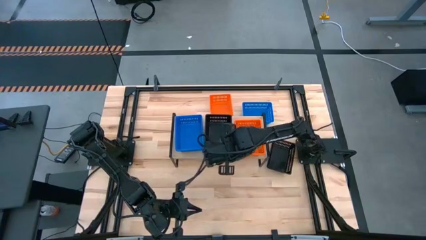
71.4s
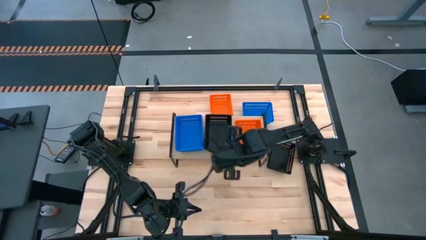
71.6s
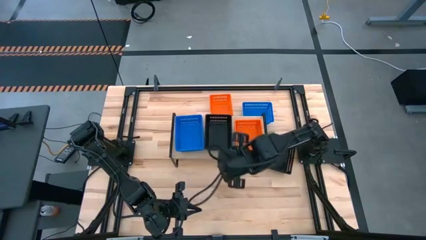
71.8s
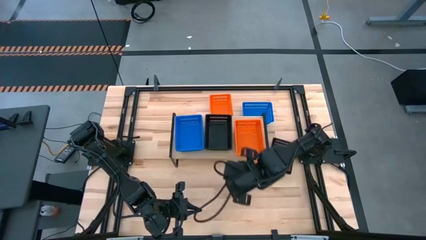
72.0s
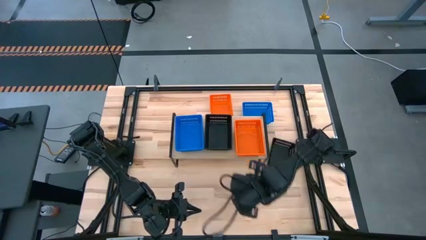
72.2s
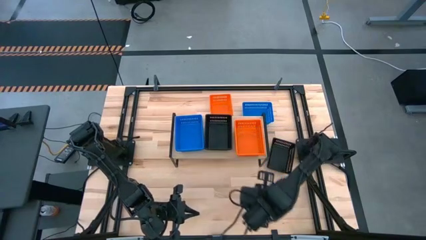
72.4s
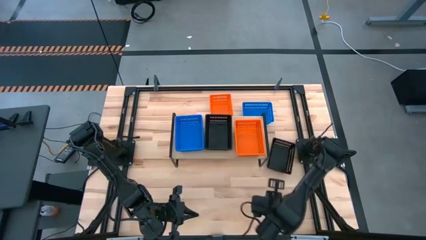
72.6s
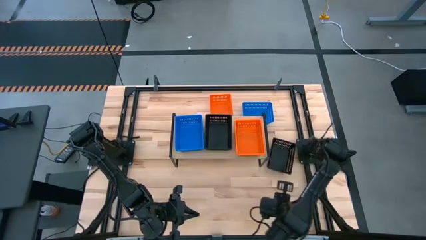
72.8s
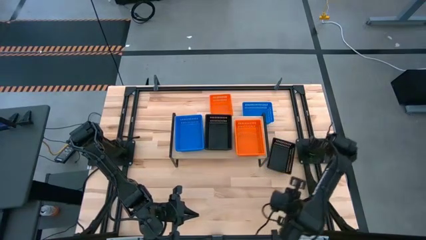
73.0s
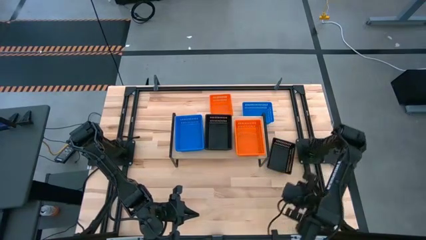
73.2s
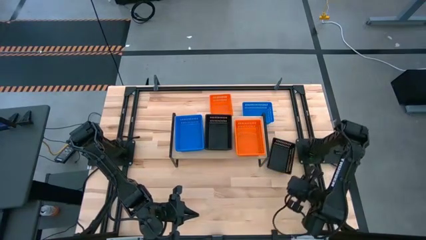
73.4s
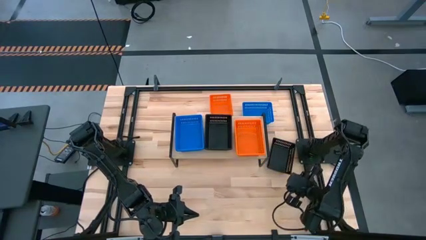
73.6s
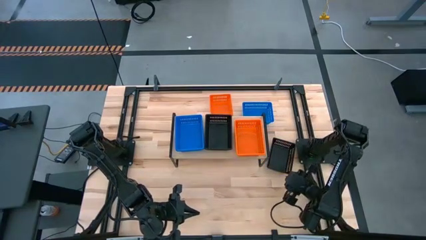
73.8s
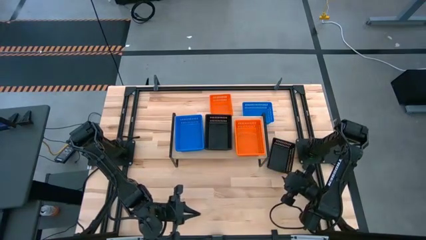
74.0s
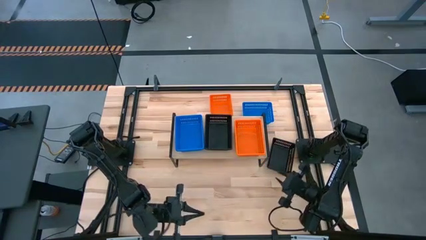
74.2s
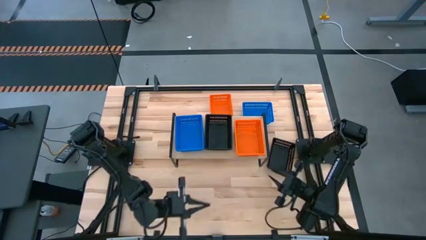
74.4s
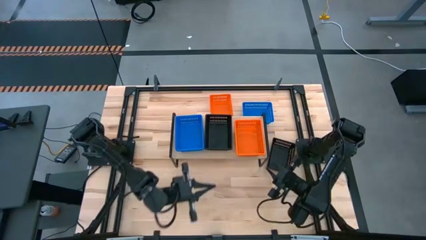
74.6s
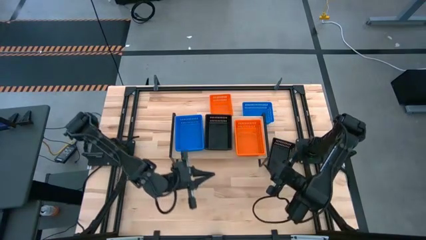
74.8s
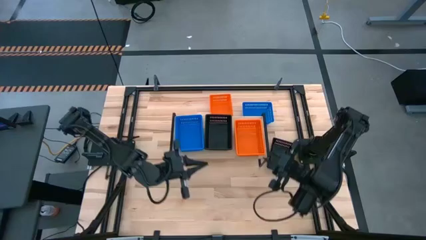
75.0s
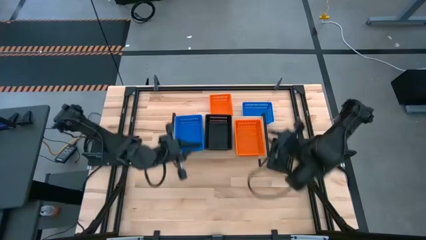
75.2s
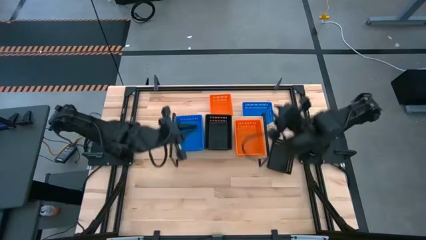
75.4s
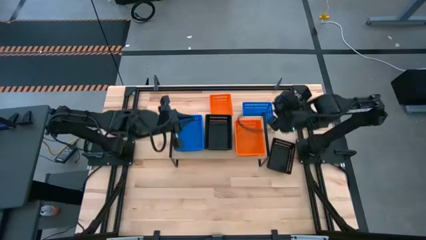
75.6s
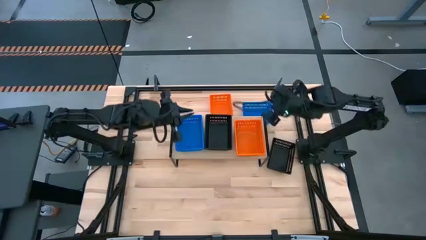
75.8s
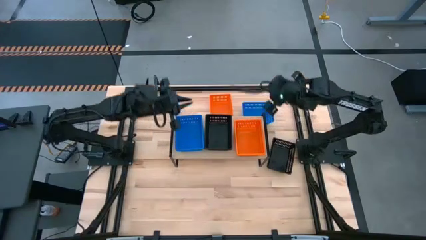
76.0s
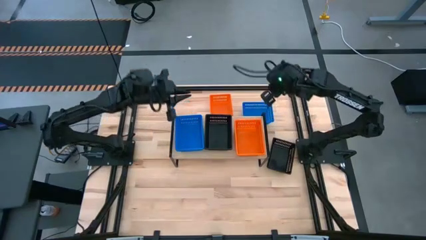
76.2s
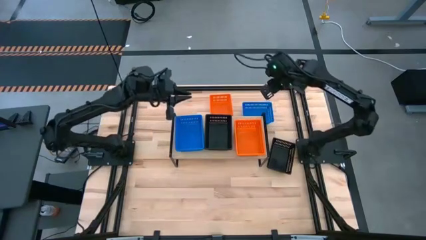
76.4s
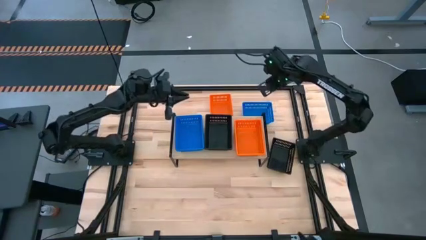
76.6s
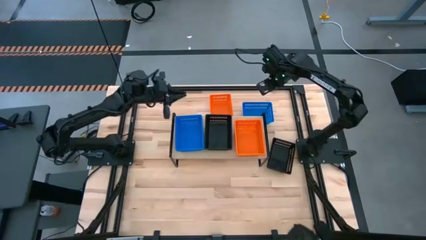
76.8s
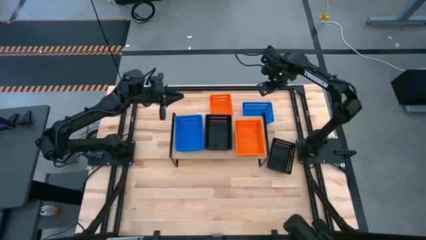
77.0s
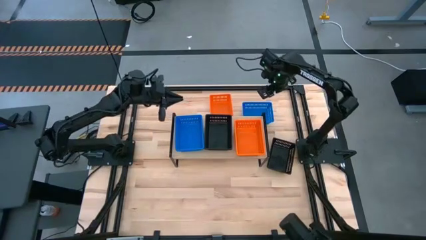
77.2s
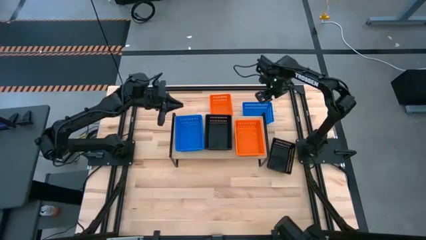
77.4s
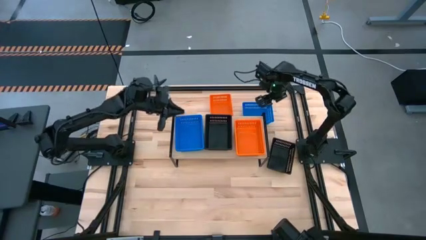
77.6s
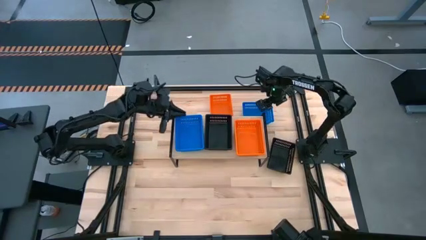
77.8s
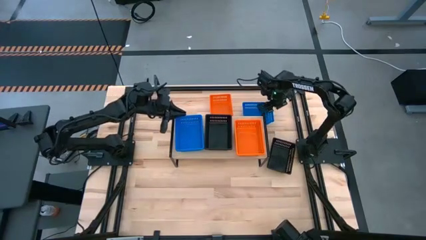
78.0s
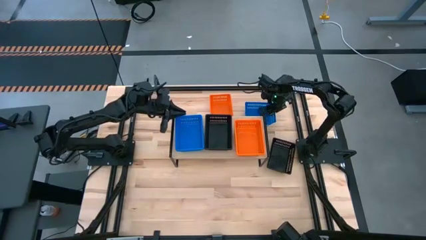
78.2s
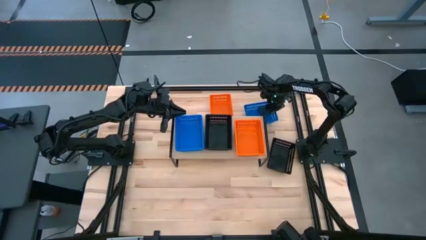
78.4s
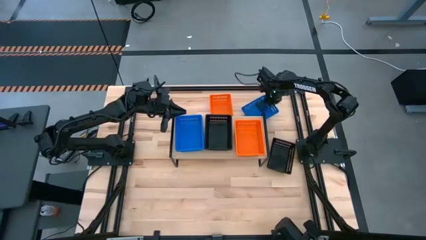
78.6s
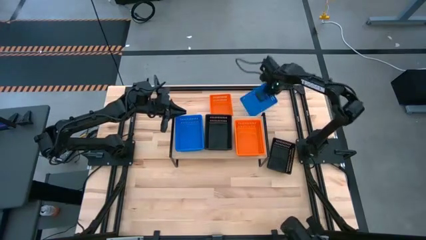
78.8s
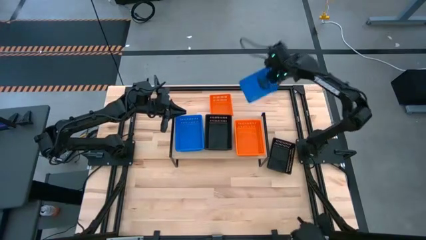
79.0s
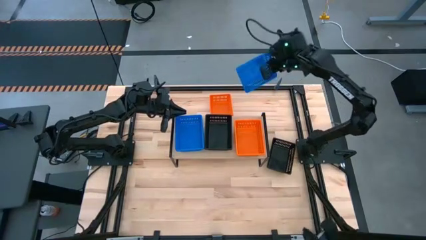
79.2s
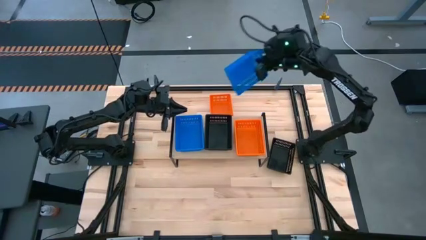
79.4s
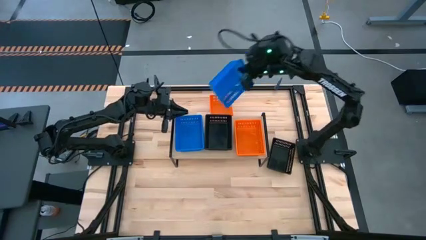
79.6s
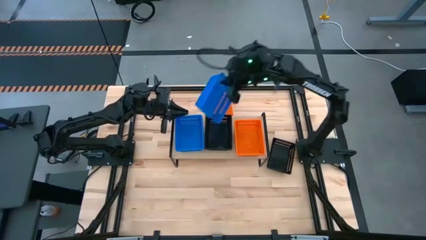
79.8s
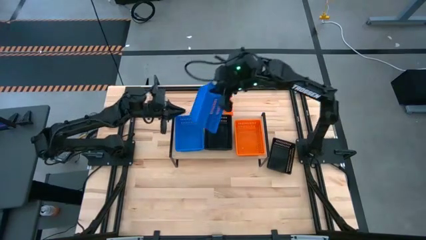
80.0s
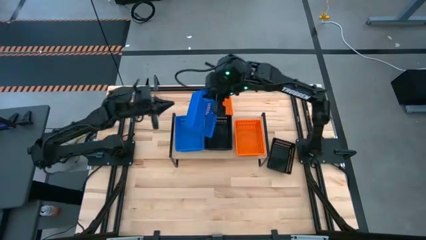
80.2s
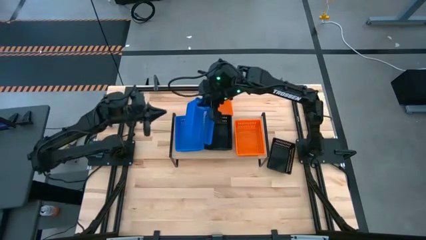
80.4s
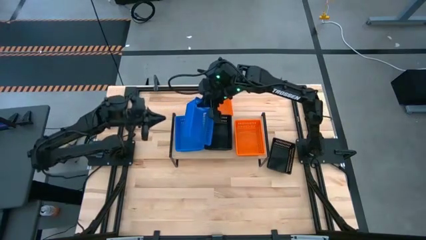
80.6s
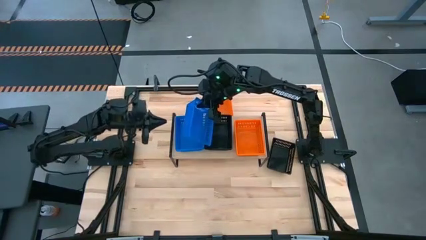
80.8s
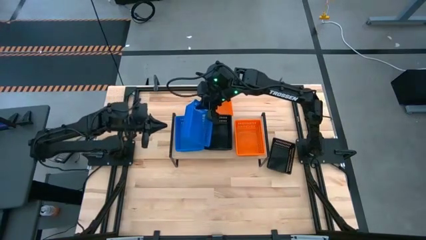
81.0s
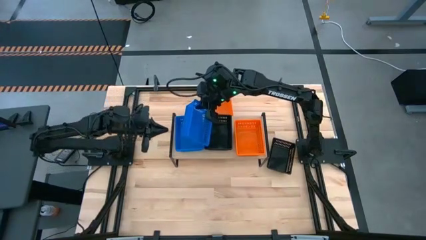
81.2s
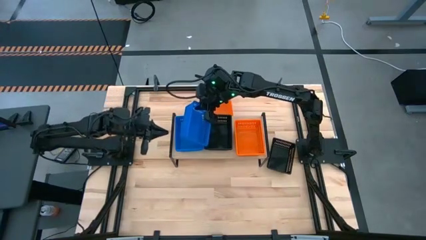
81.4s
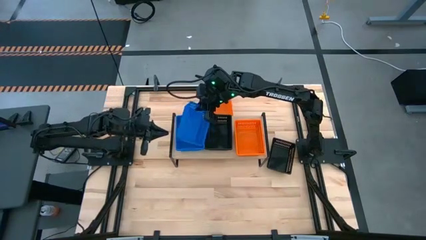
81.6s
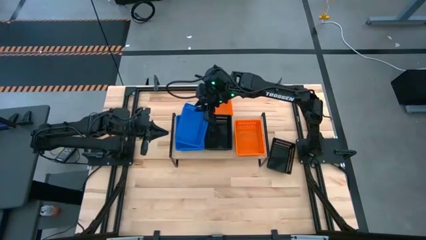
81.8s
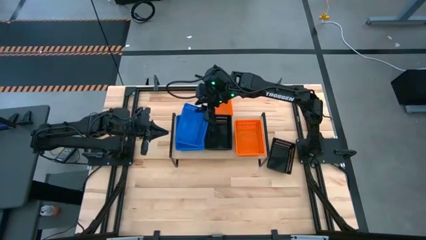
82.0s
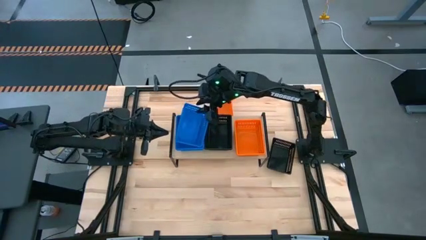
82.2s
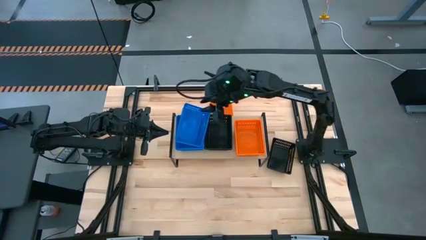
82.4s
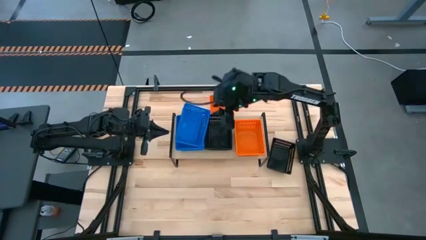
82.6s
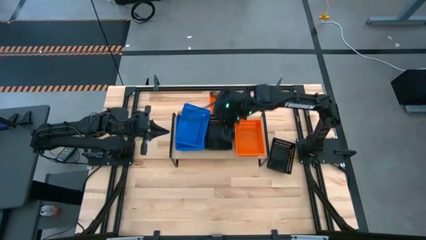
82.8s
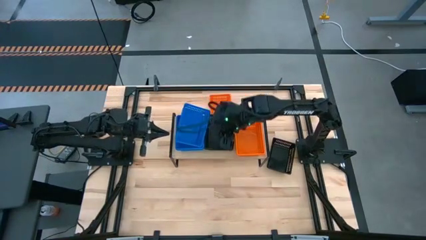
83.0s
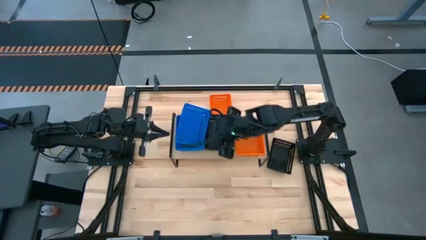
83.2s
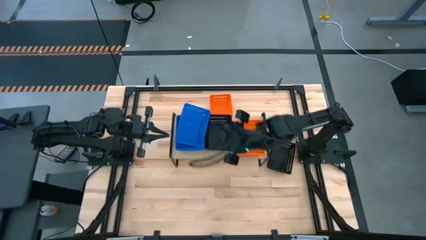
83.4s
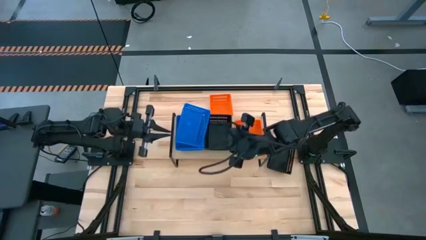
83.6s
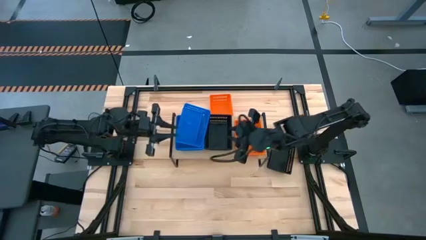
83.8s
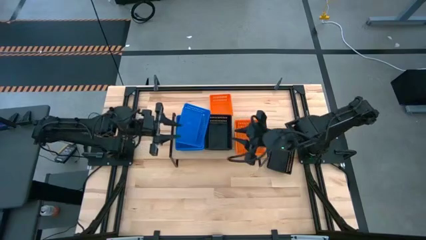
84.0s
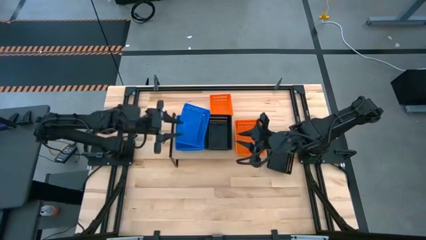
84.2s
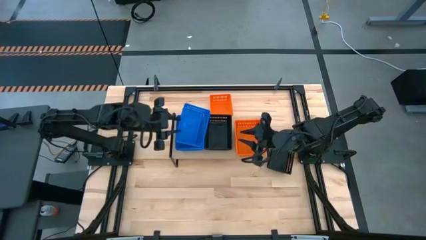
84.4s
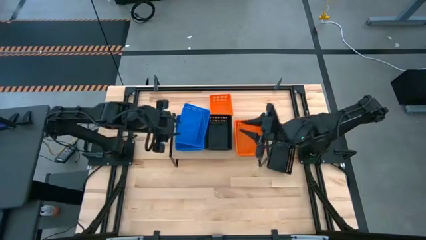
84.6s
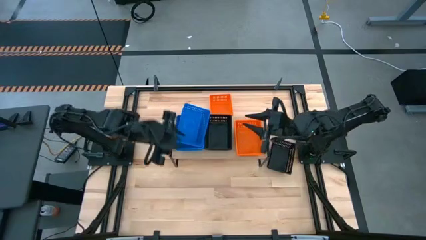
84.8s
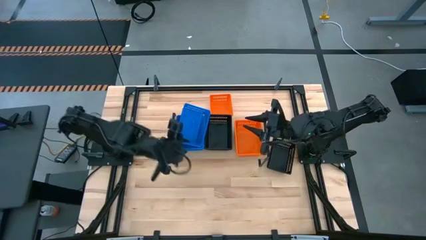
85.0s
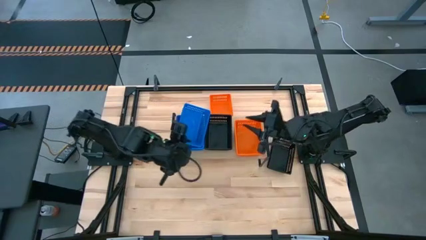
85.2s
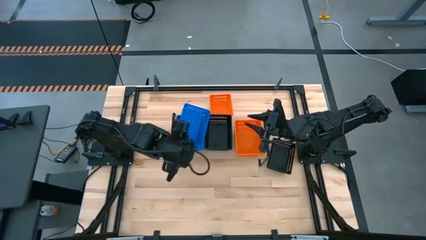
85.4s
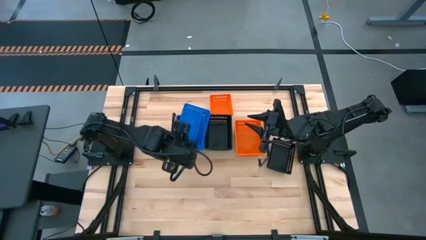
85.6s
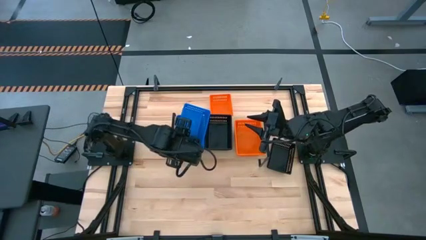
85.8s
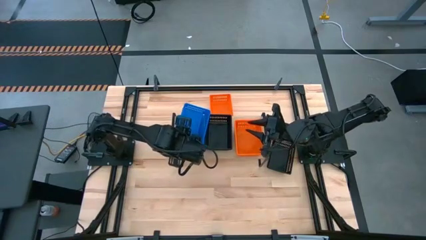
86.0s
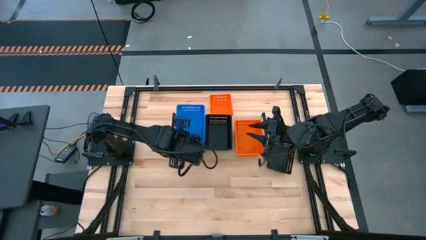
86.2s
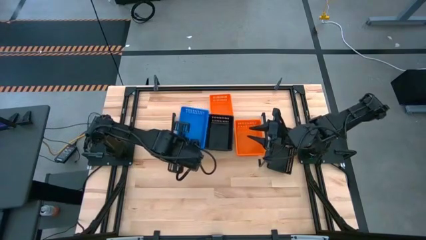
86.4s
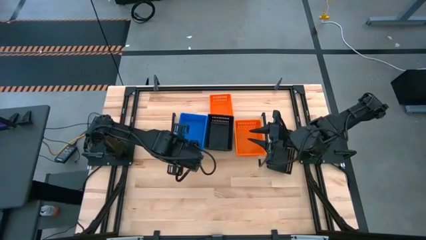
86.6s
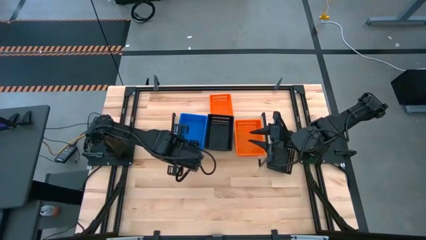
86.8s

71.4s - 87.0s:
Task: Stack baskets on shelf by color
Stack the blue basket on the stacked blue baskets on the shelf
